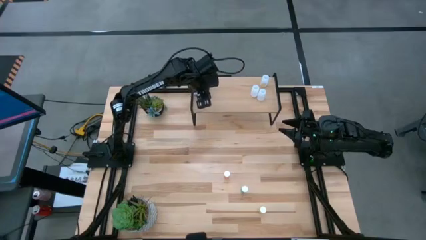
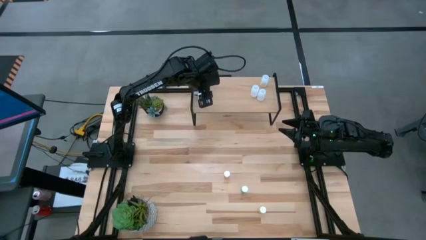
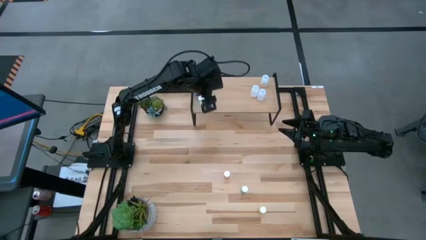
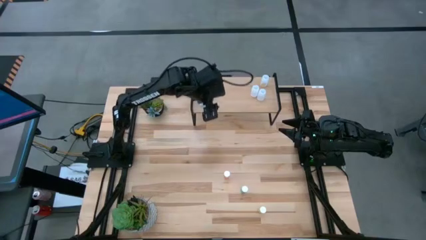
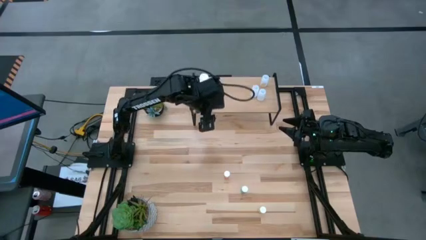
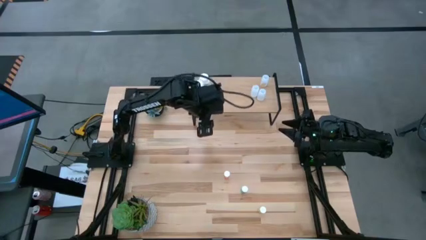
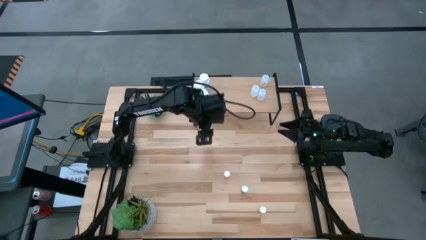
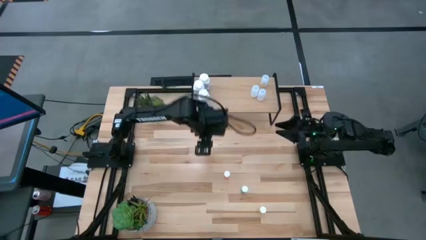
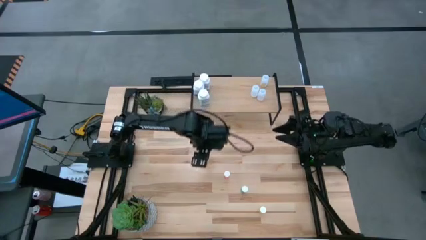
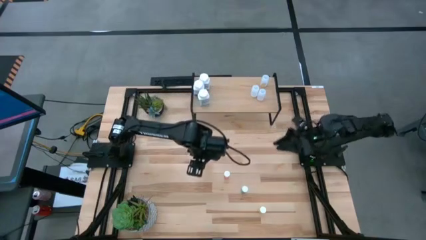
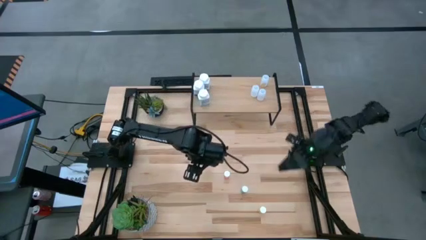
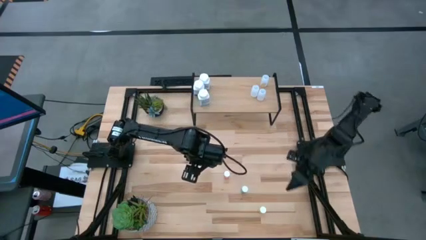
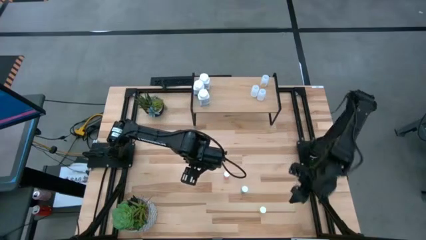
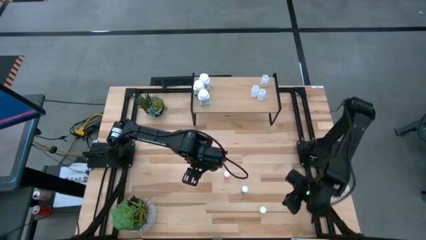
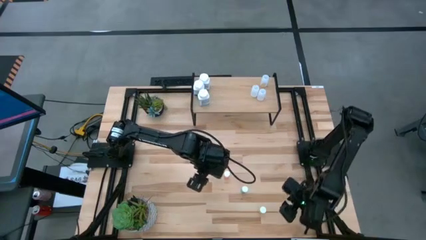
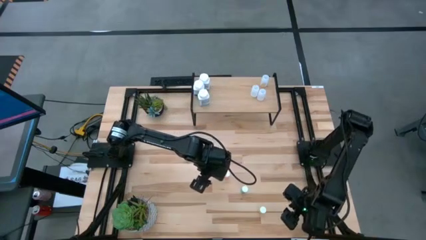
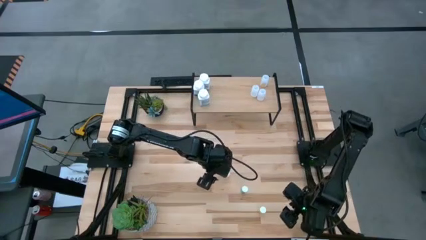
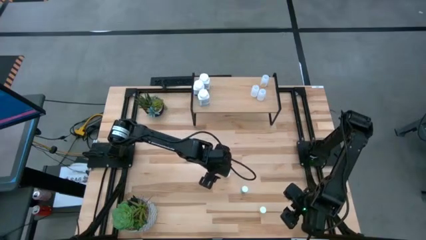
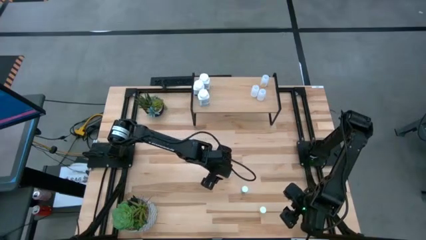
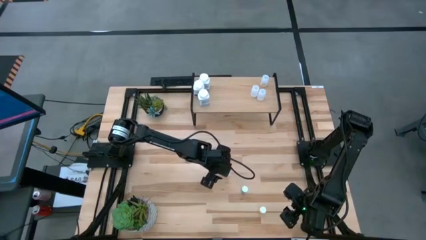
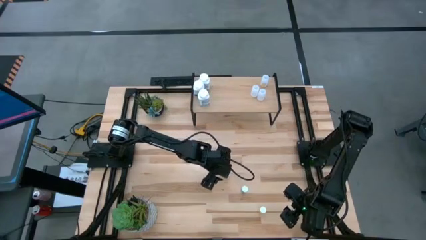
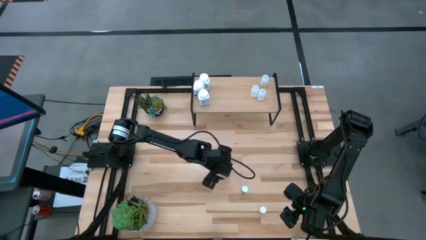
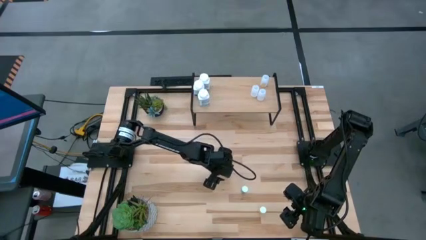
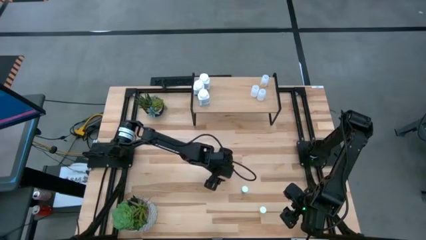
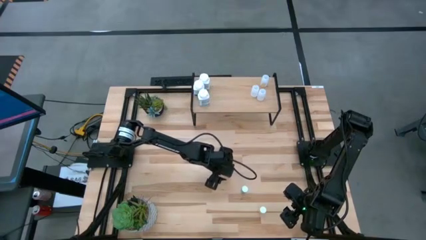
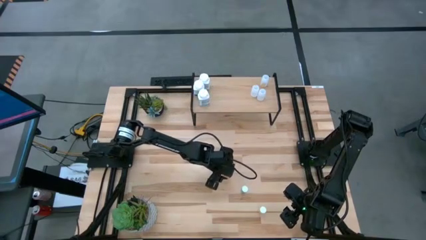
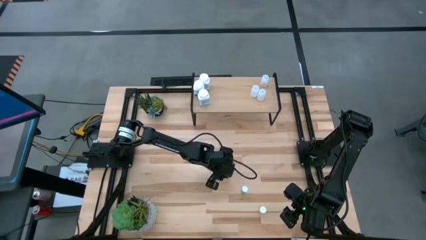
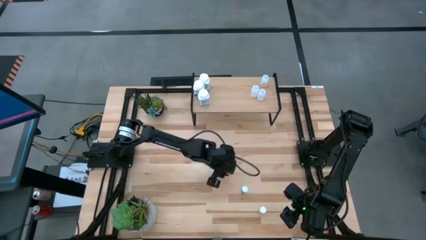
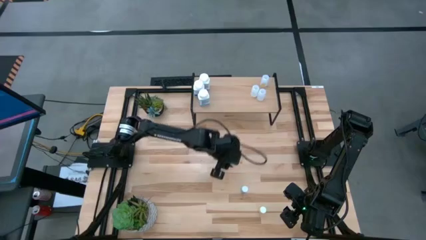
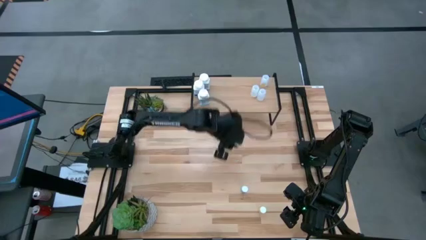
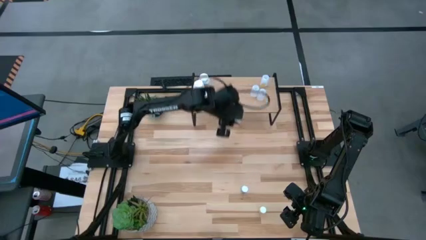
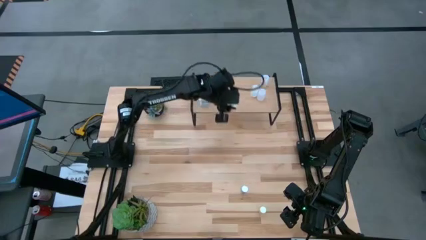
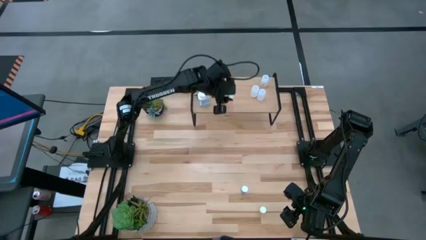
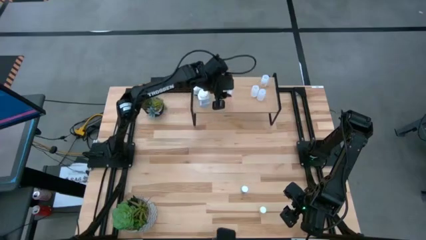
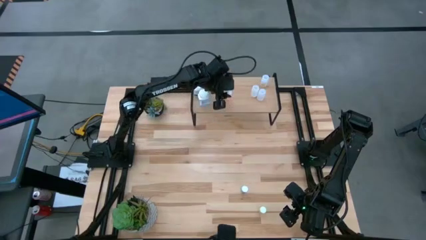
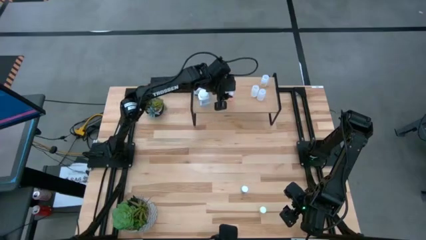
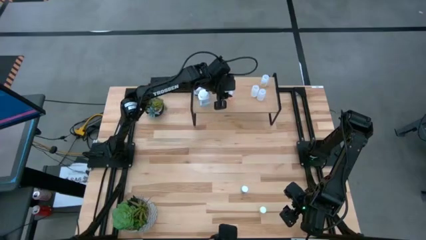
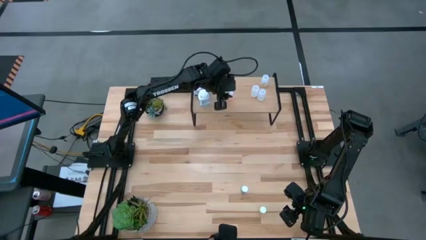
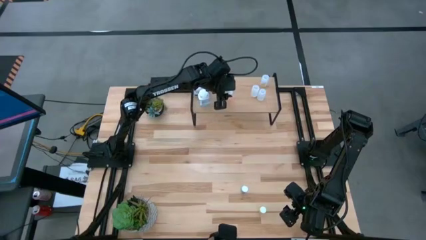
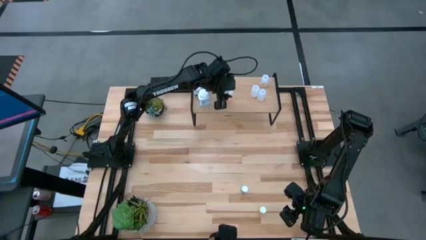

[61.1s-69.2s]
Task: Pick and place medicine bottles onto shelf by color
Put the pink pill bottle on the shelf

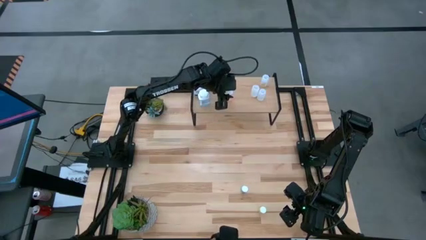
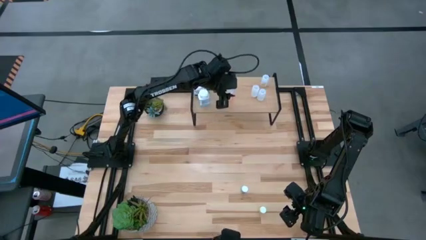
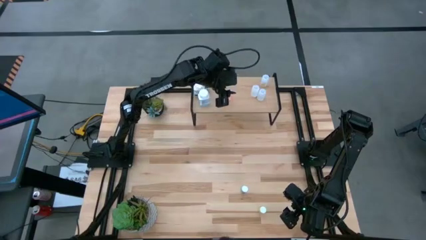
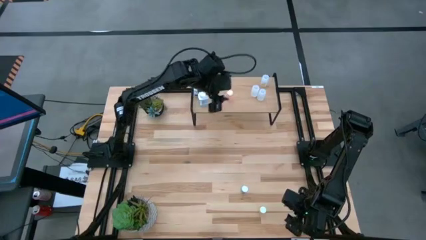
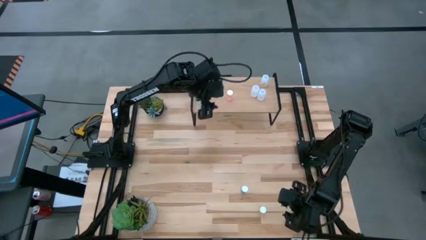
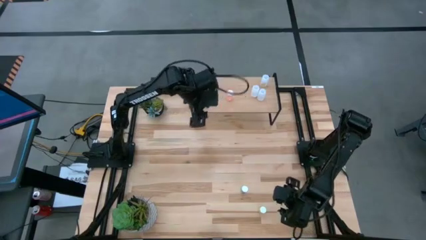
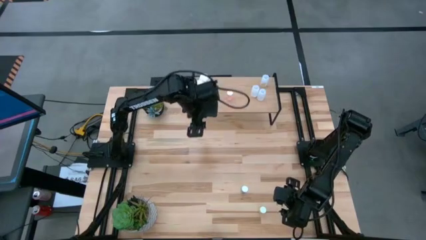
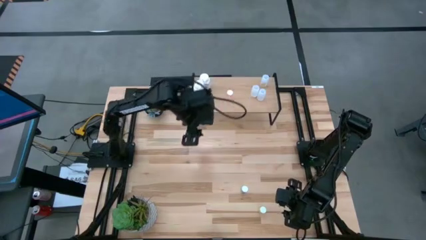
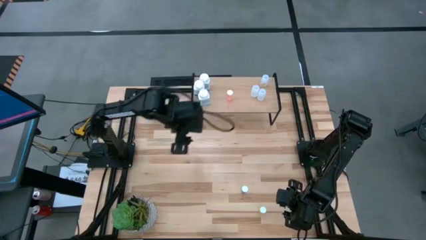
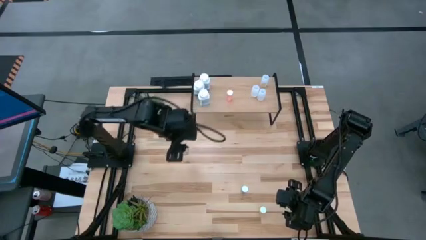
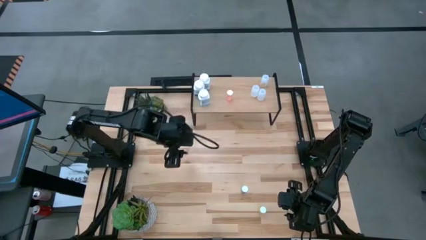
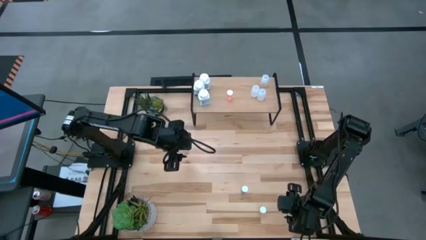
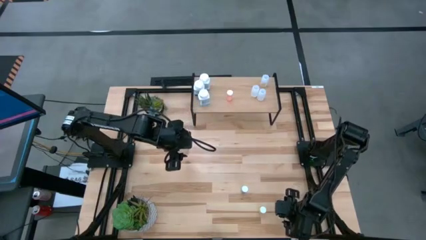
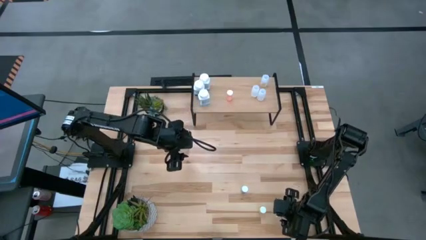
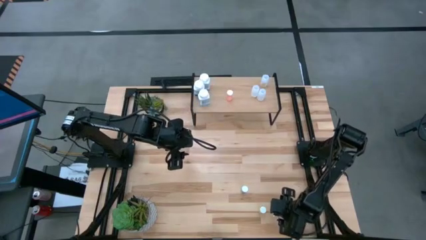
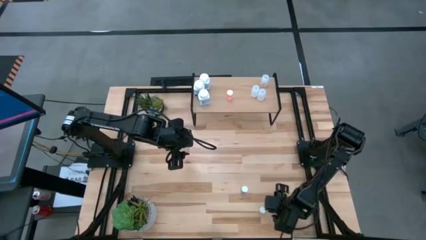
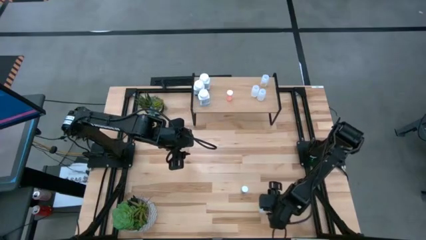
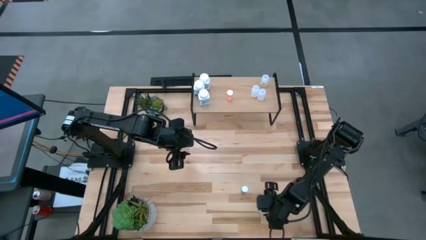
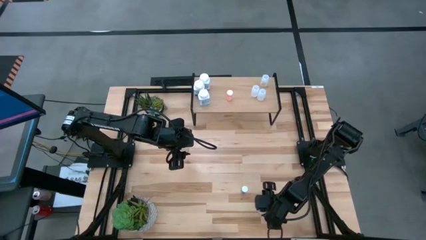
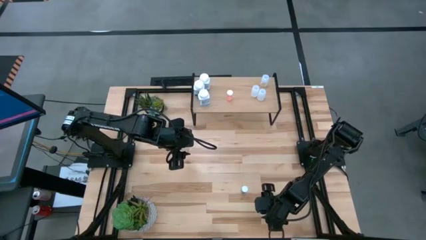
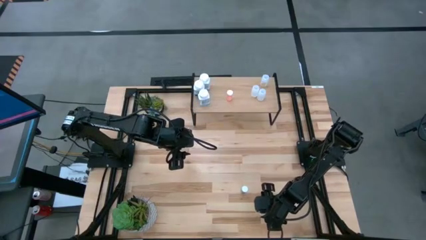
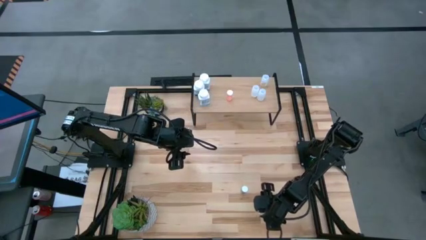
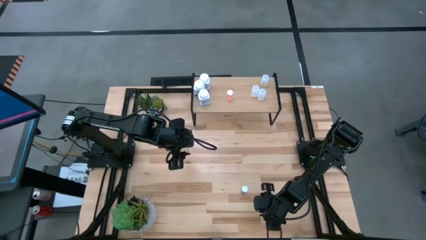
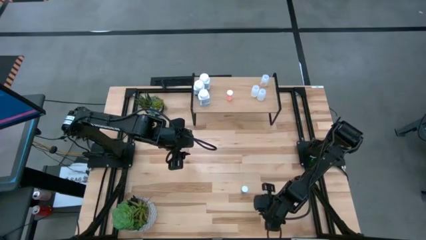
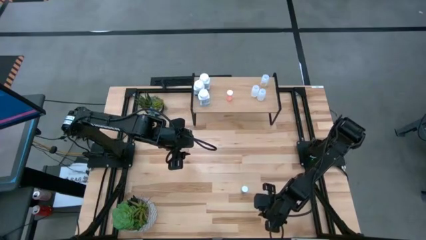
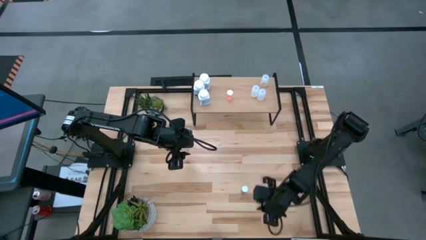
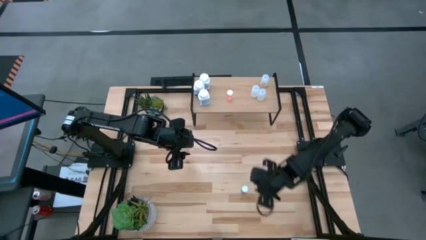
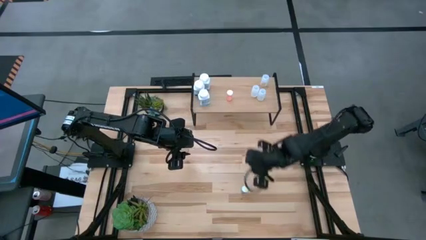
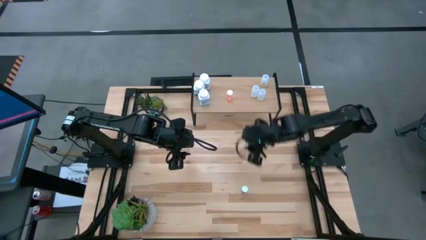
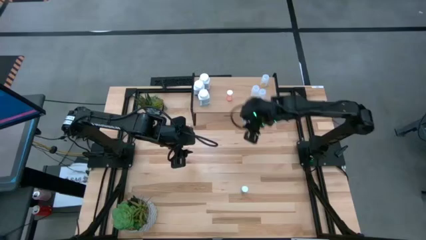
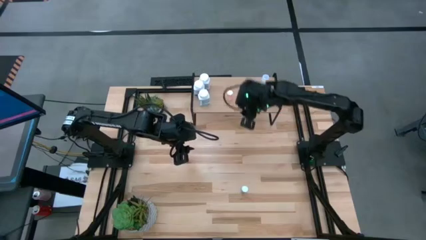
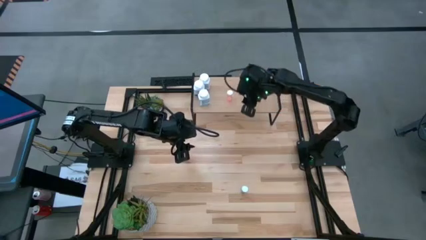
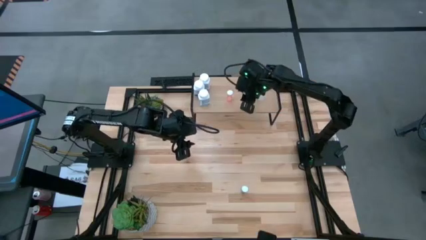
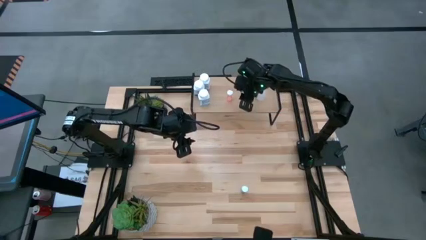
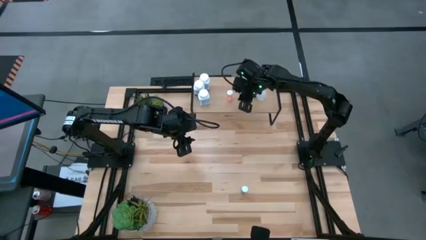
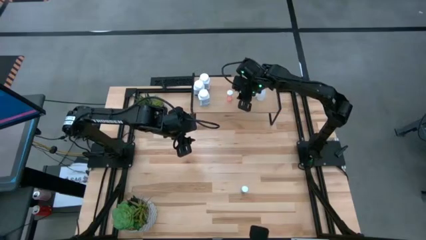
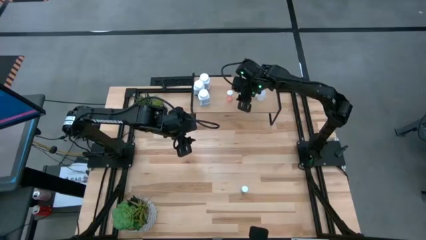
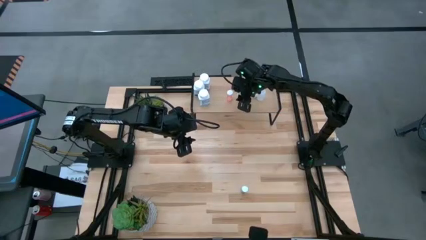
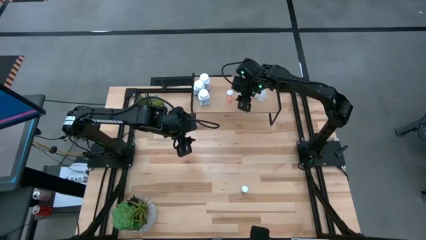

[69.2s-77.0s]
Put the yellow pill bottle on the shelf
